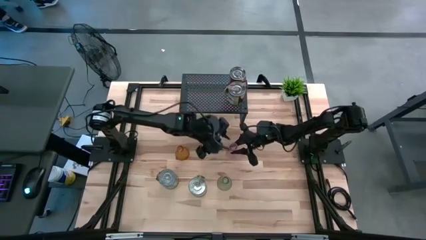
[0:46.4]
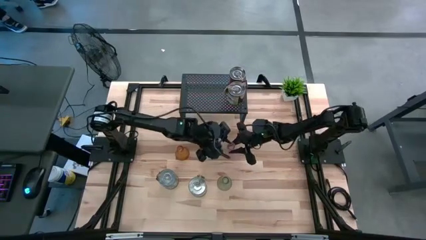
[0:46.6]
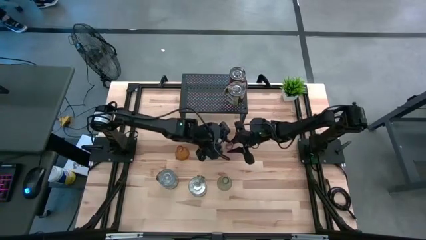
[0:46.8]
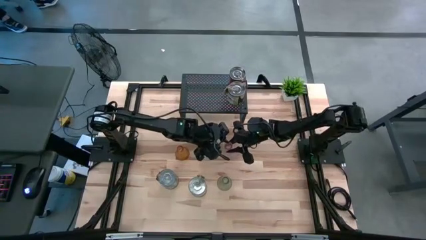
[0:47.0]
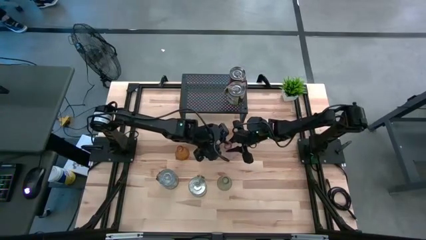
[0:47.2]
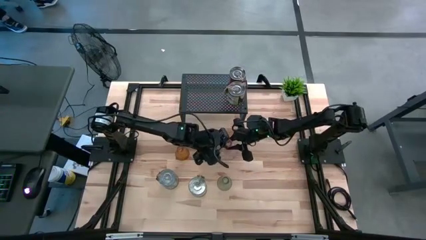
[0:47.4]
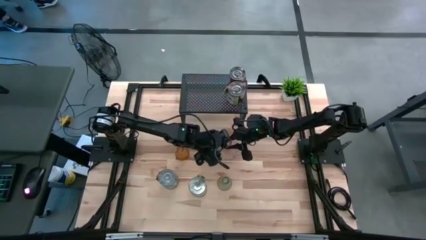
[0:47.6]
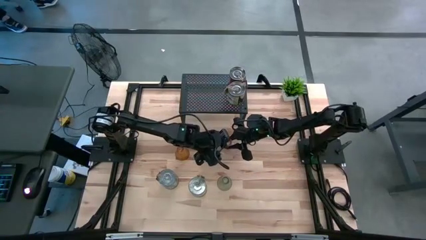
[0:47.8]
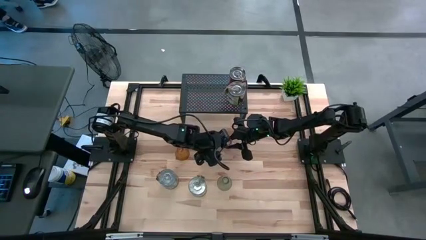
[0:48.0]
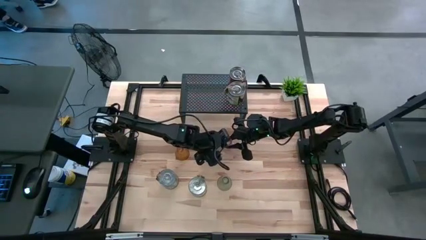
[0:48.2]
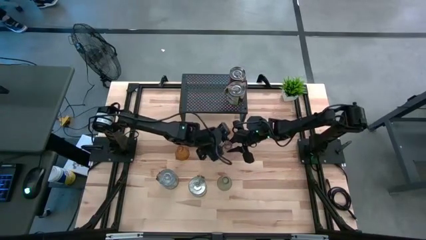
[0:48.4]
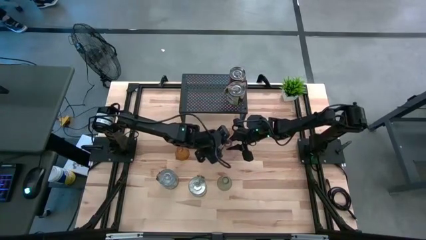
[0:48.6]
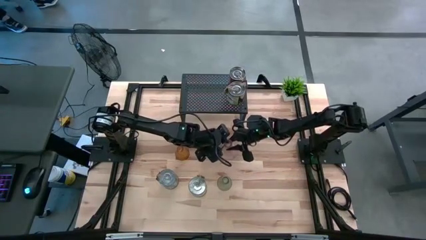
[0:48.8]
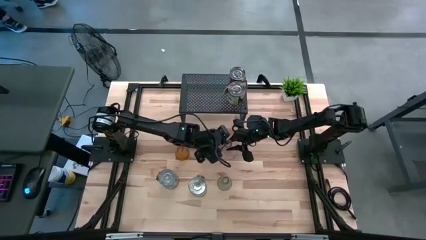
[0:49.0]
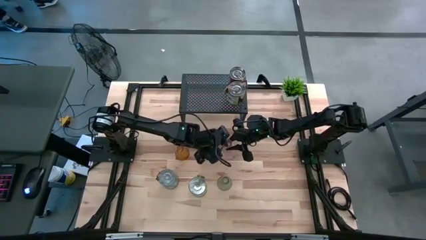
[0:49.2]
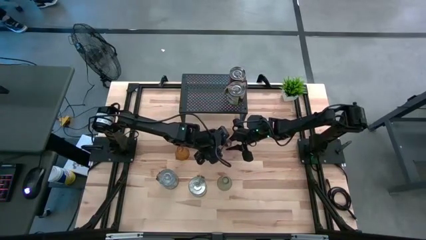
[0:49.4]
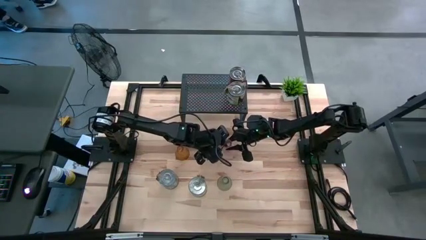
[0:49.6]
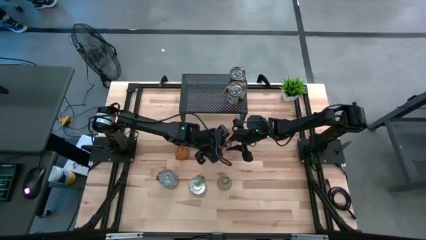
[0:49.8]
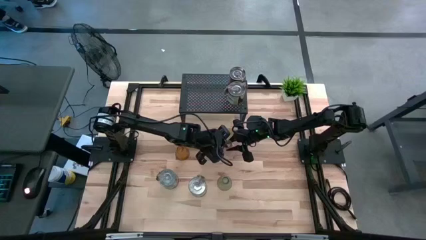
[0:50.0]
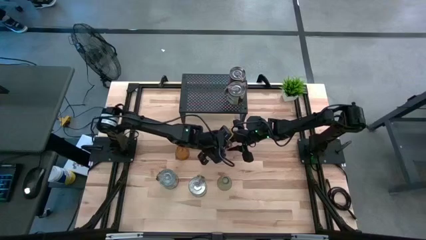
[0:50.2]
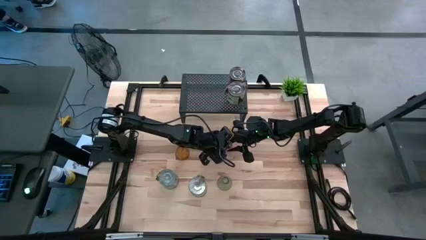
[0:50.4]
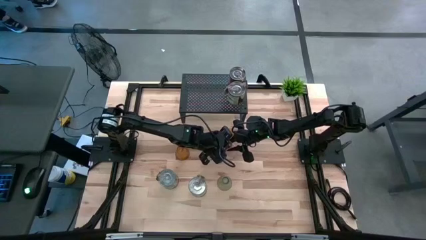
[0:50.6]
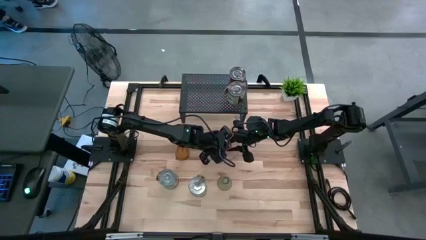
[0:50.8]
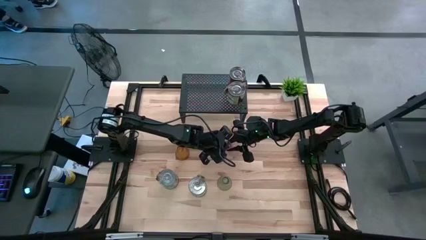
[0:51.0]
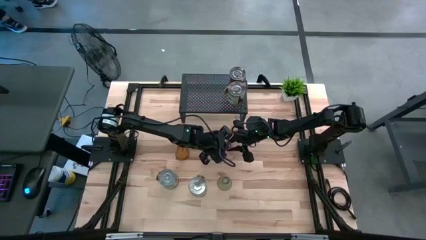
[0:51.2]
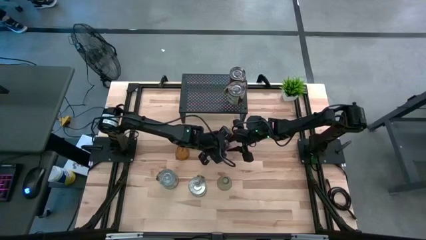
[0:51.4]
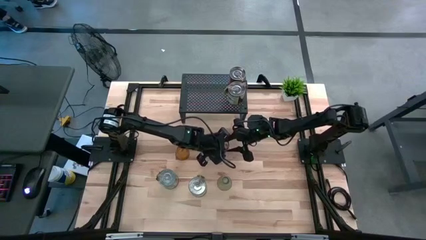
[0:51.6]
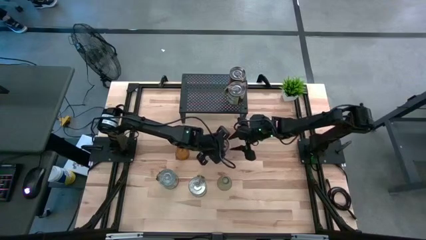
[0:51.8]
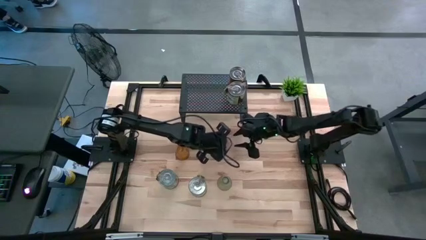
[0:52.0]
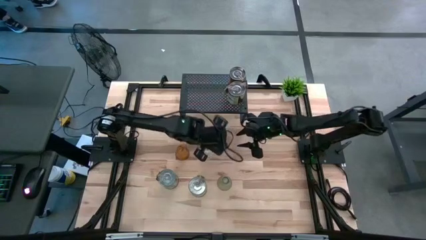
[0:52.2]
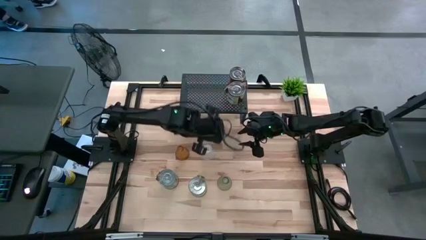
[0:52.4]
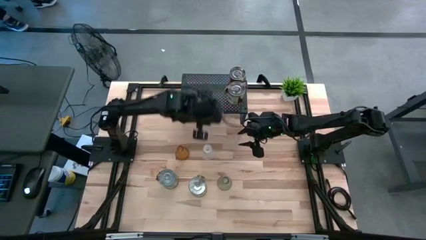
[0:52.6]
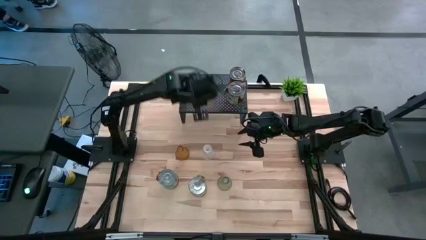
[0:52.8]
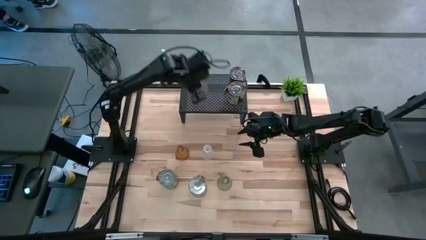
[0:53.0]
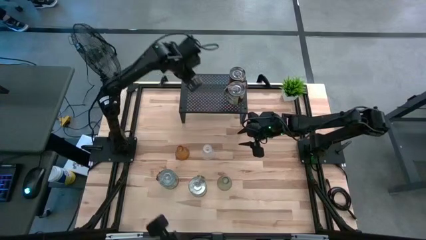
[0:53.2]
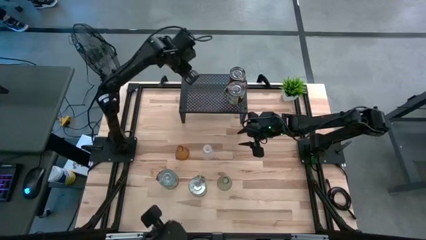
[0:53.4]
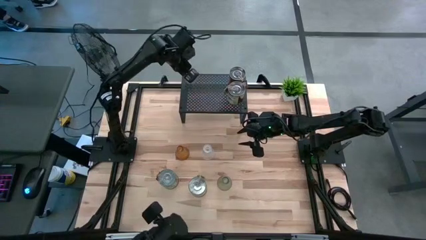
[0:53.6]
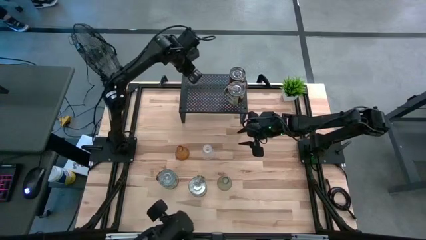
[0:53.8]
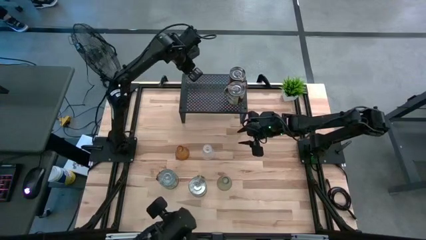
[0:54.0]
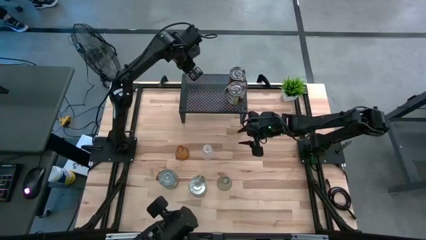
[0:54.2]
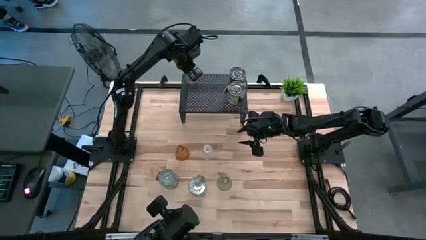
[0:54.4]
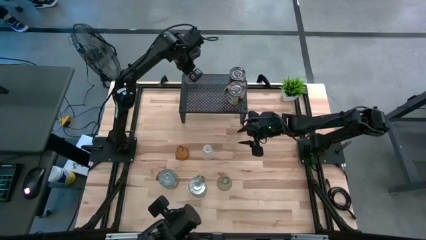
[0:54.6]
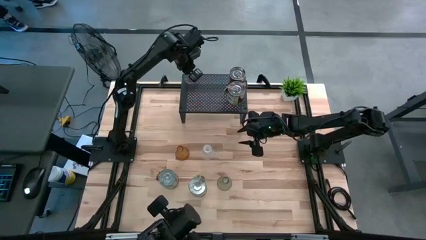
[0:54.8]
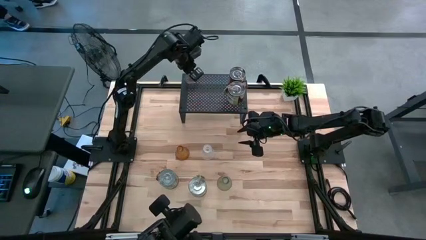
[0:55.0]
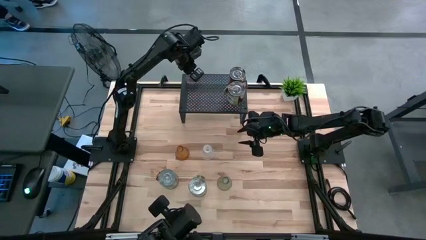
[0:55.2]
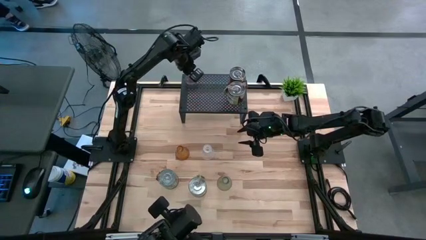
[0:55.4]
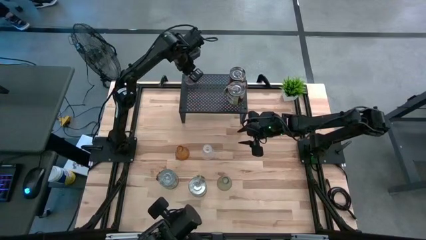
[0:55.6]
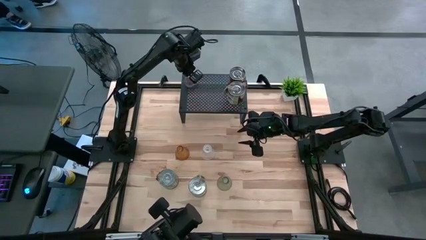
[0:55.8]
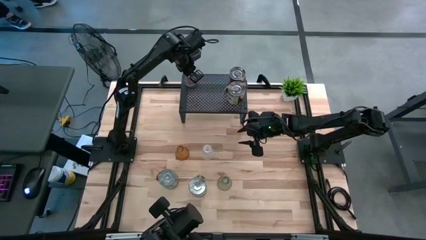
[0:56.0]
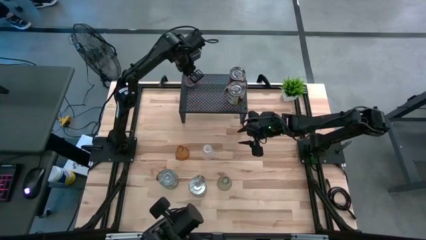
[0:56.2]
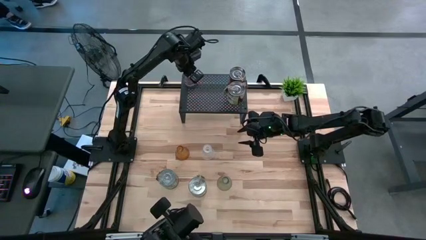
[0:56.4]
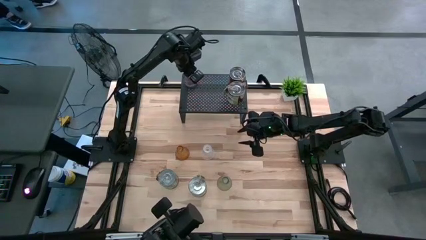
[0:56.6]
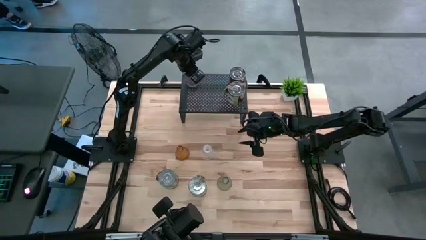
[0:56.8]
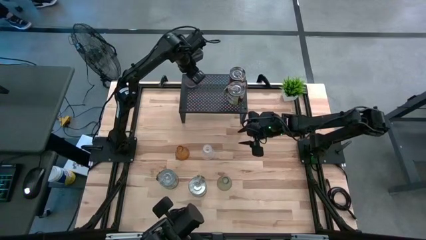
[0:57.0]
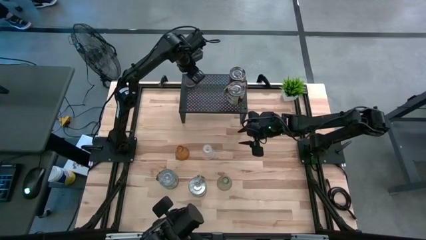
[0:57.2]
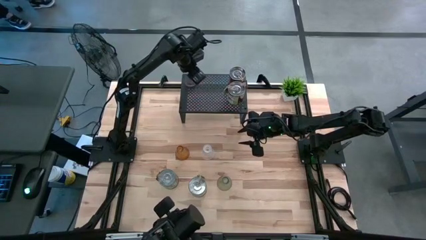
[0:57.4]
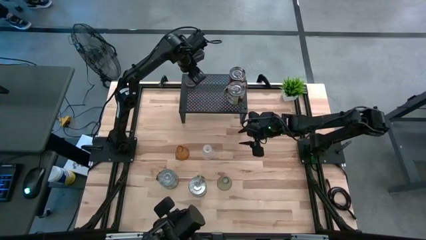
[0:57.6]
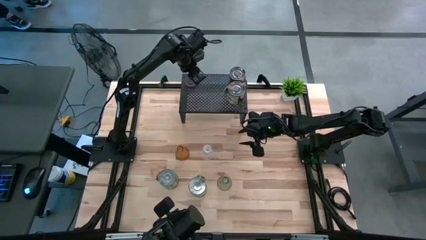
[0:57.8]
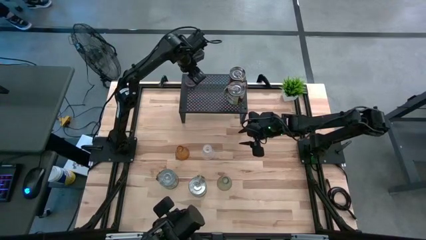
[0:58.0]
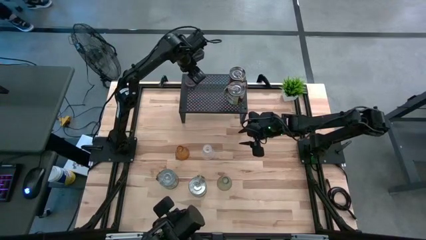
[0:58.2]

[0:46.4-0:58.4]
Task: Pick & Place candle stick holders
Put the pink glass candlestick on the shelf
